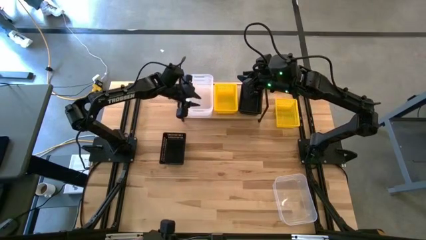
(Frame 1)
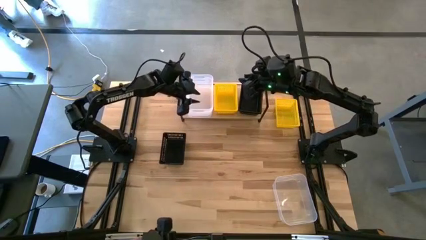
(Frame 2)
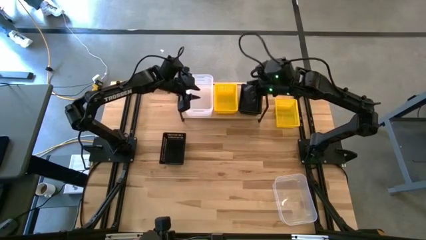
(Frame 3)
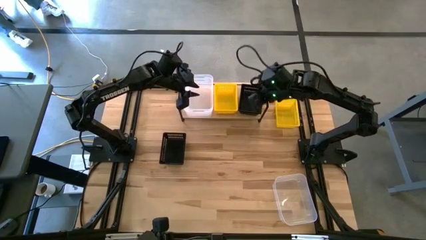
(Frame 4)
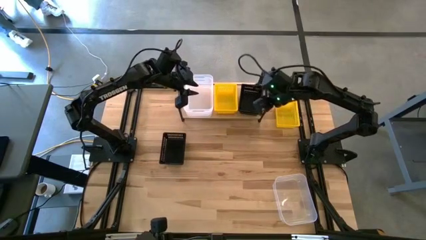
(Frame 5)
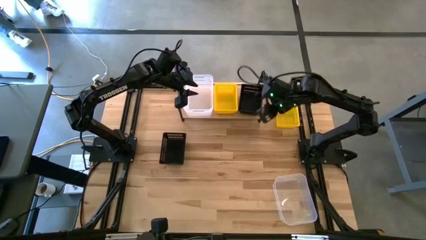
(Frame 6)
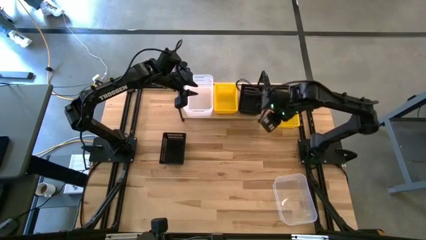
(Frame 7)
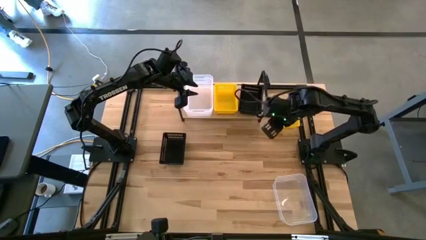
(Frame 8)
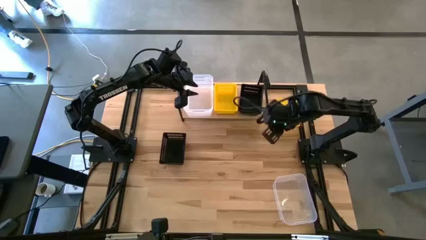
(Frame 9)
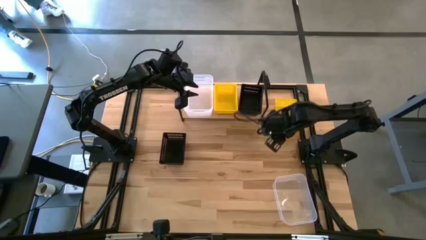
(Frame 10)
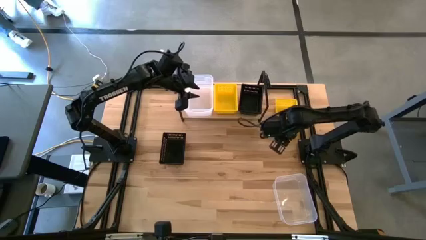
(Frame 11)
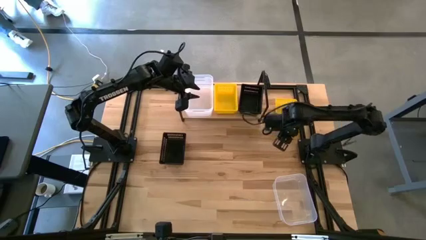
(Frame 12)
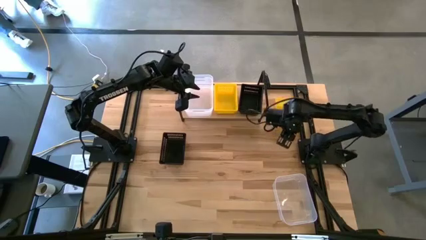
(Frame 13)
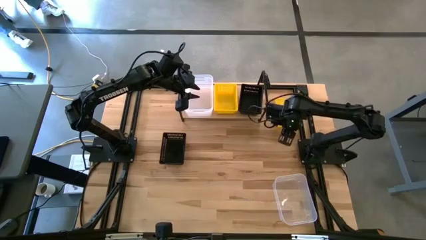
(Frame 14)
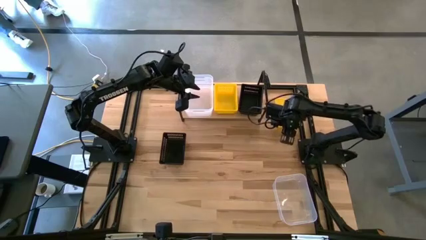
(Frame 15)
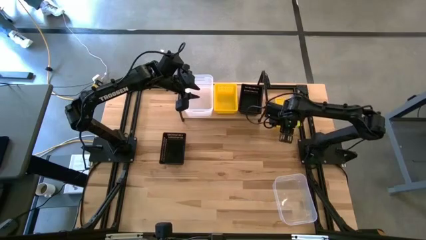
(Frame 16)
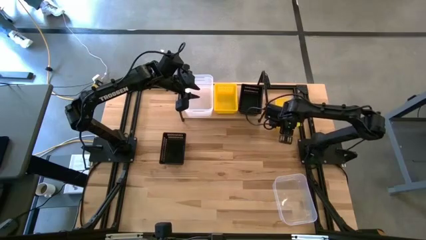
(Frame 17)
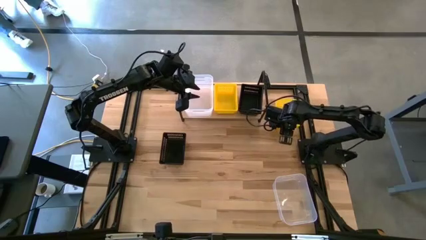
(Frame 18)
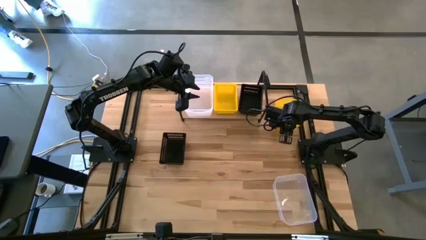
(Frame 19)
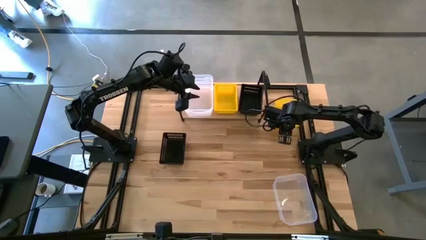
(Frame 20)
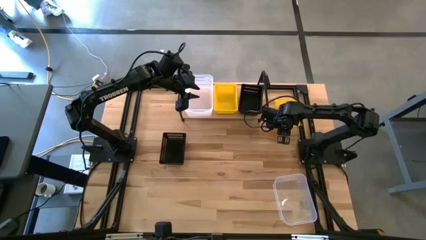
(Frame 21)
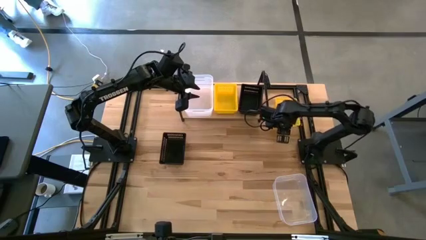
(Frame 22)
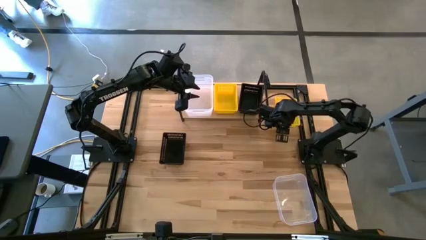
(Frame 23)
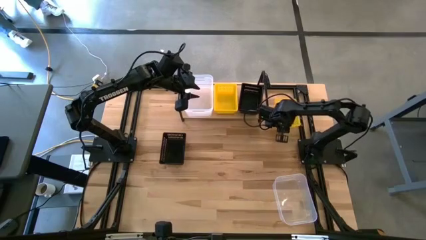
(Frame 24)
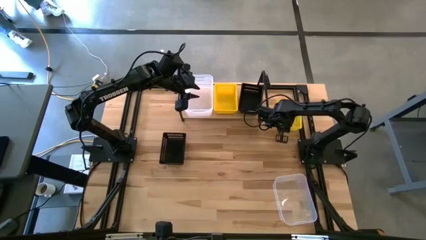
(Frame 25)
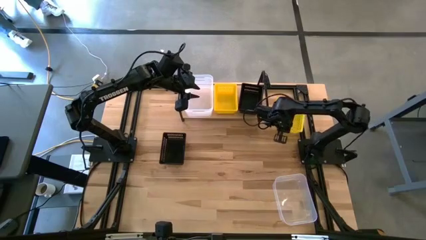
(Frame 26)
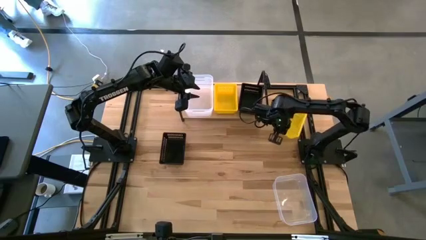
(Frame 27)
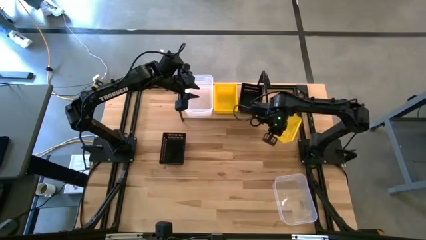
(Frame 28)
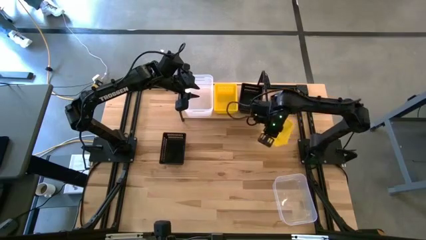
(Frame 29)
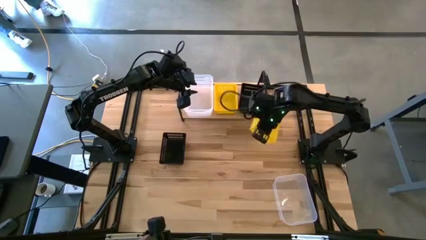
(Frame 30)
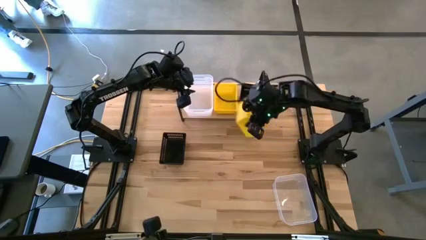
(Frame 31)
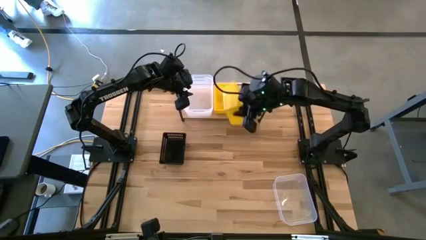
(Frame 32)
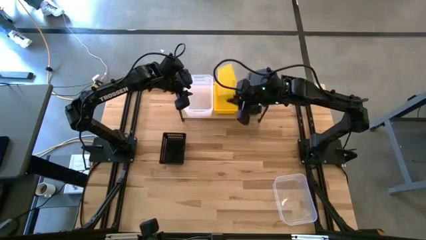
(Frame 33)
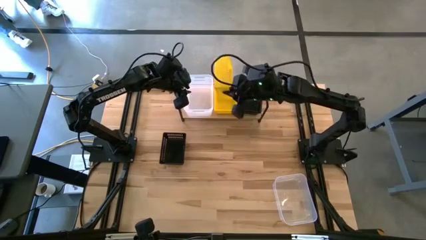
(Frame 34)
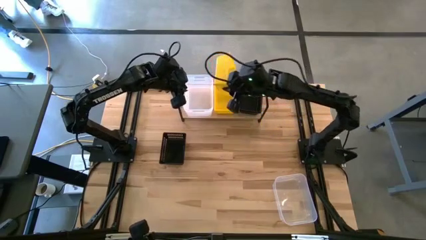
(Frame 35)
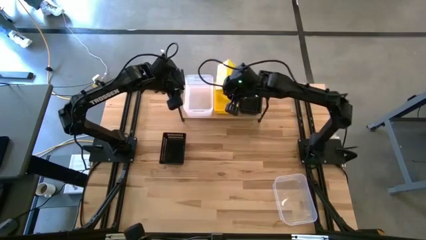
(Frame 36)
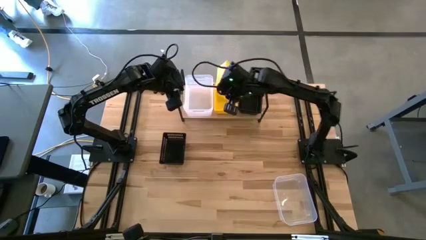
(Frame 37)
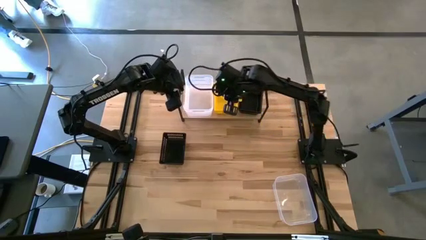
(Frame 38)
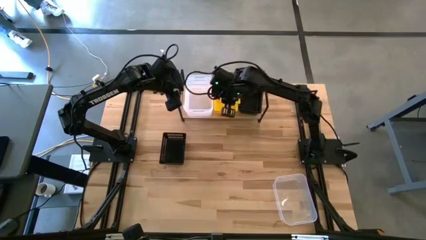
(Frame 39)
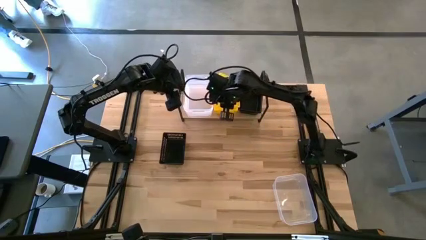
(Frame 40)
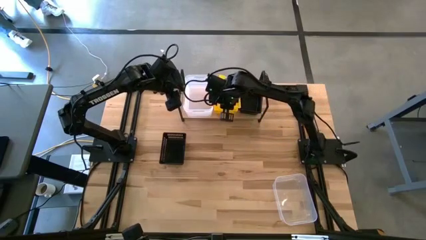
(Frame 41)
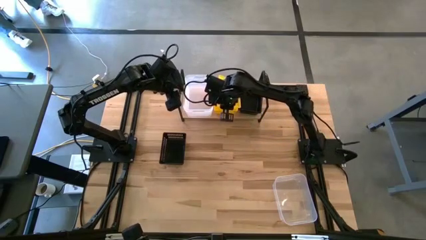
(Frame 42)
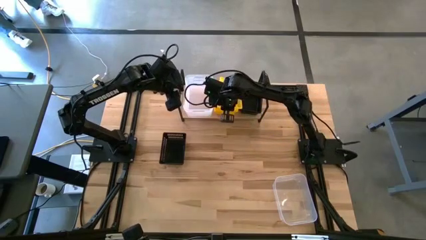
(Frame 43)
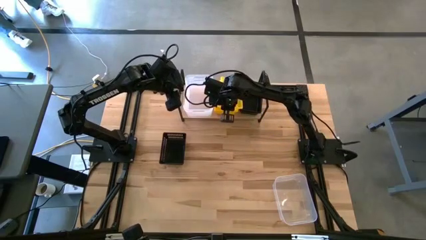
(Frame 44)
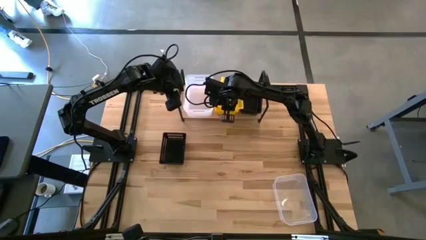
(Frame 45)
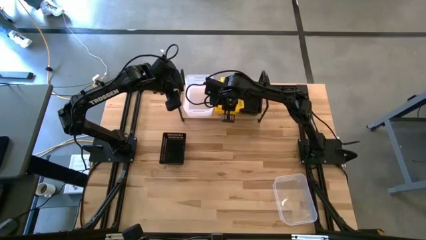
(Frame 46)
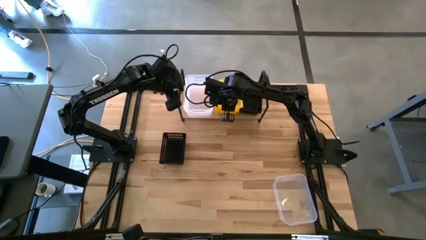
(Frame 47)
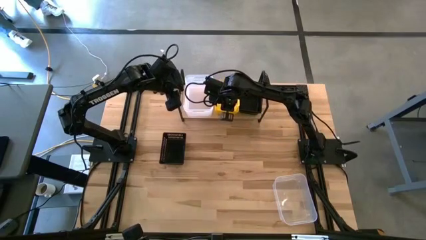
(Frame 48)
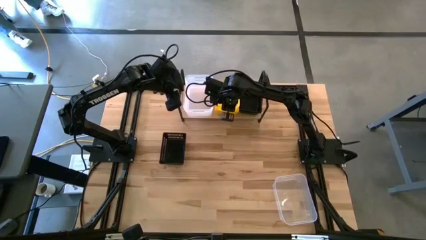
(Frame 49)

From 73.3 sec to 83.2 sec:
Task: Stack baskets on shelf by color
Stack the yellow bin on the yellow bin on the shelf

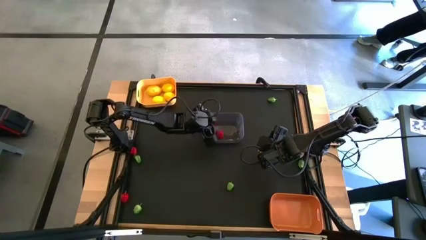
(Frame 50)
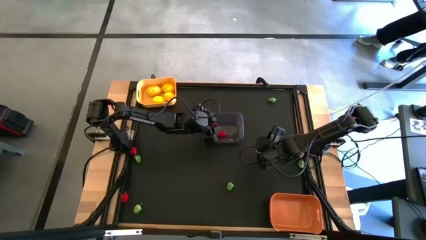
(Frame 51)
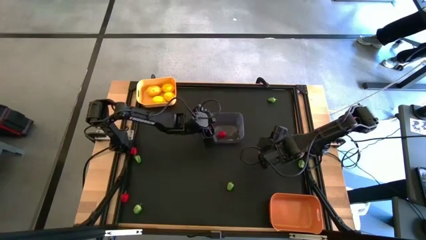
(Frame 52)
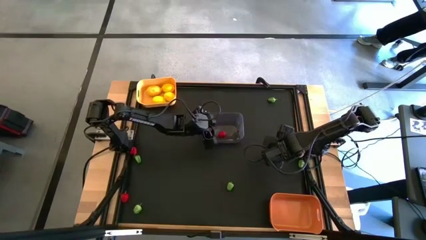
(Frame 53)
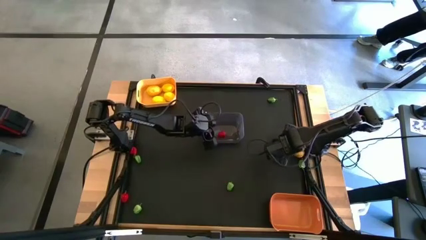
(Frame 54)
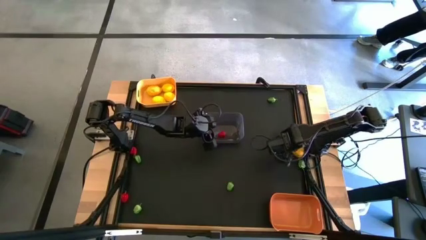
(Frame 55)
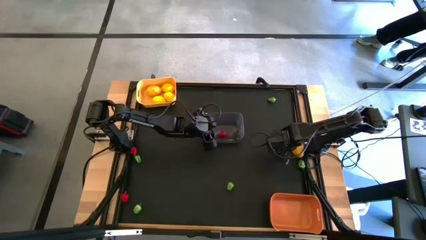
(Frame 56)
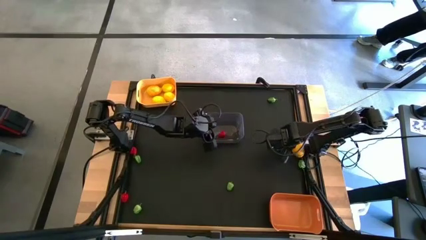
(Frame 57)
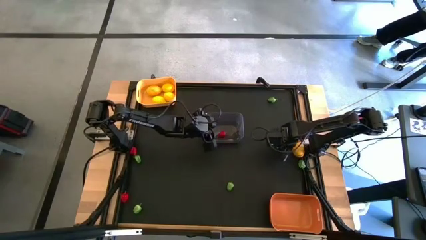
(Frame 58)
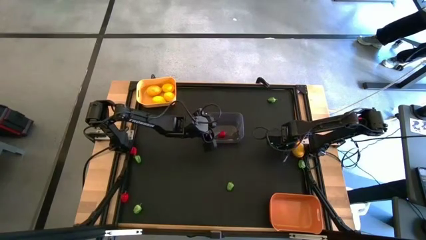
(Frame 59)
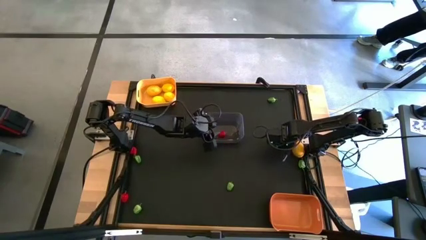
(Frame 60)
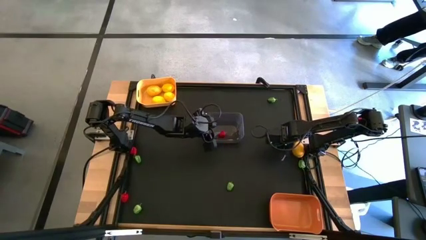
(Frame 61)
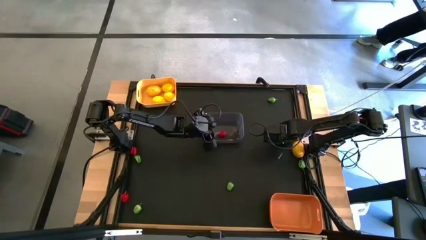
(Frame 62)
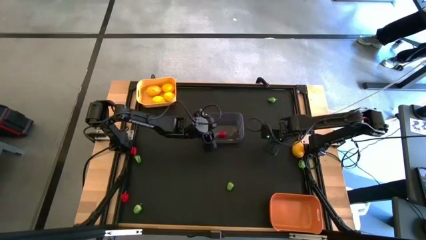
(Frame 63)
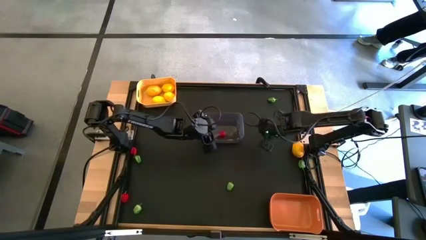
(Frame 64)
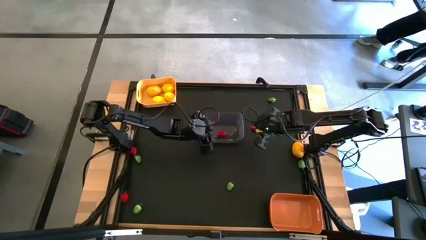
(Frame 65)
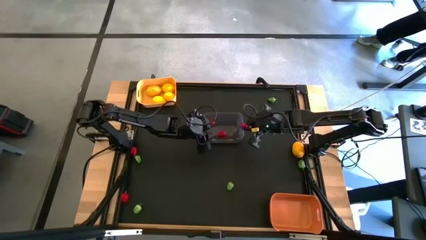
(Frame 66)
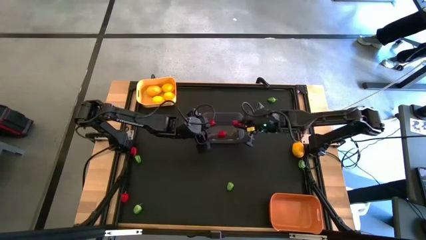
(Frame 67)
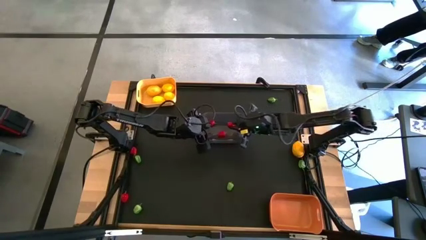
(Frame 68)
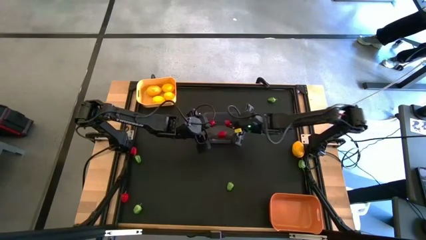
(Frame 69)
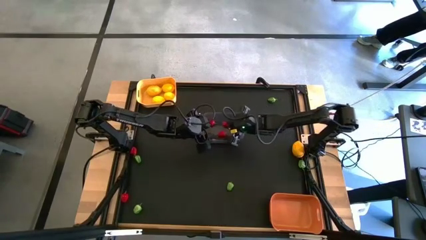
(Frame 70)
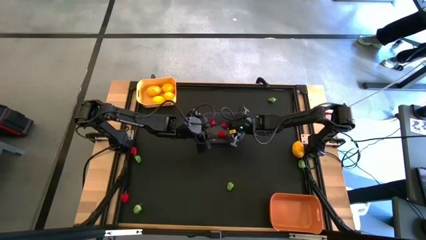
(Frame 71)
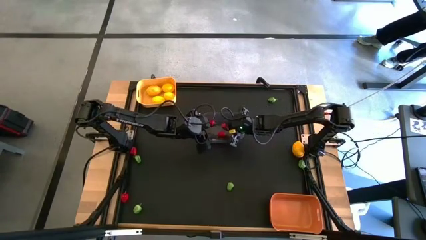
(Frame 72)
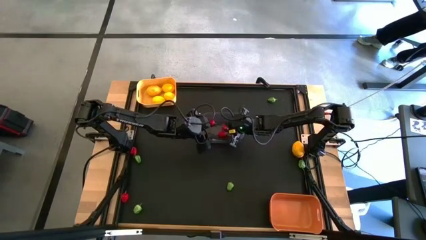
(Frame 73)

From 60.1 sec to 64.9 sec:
Task: Sort produce into baskets
Put the red bell pepper into the transparent bin
